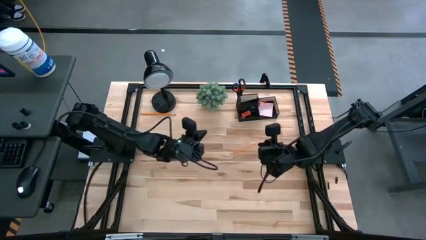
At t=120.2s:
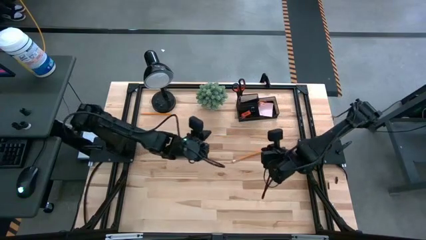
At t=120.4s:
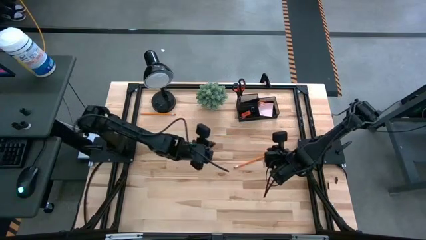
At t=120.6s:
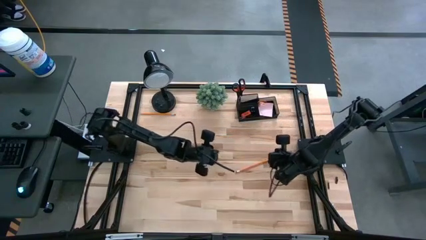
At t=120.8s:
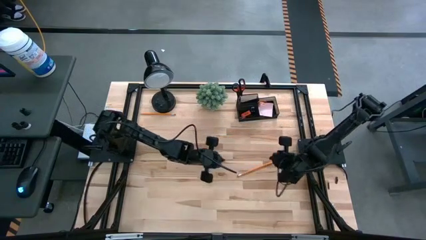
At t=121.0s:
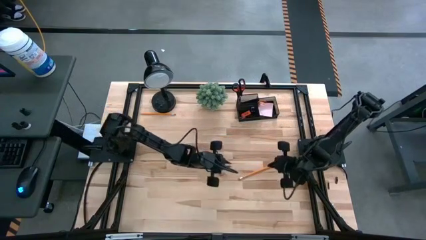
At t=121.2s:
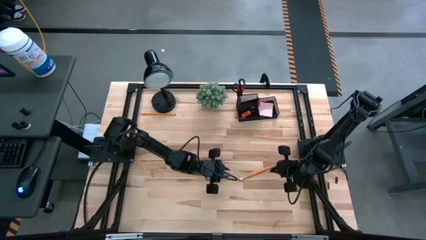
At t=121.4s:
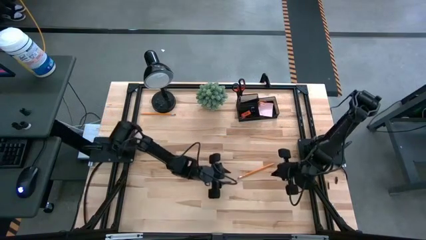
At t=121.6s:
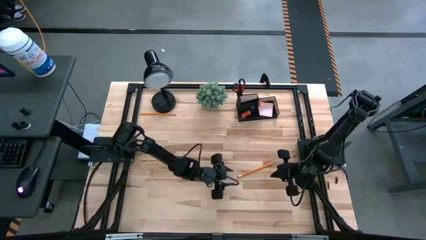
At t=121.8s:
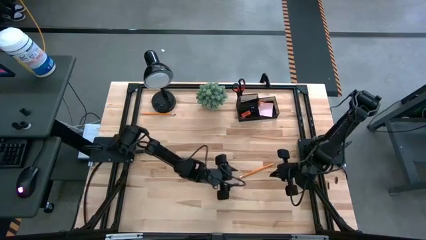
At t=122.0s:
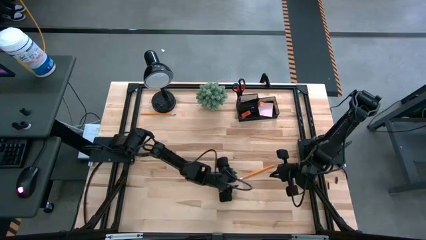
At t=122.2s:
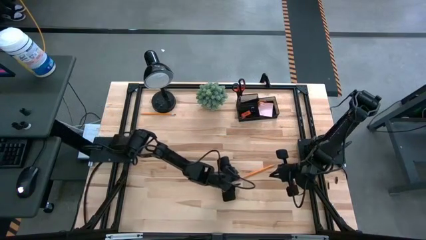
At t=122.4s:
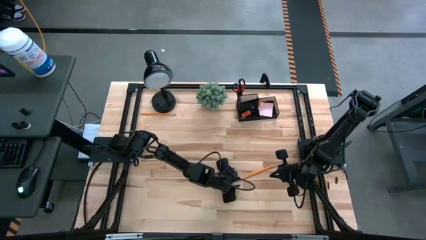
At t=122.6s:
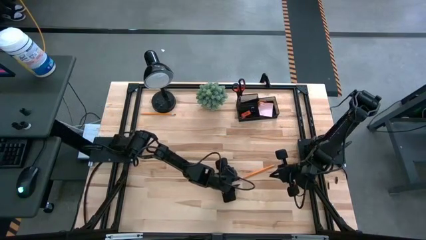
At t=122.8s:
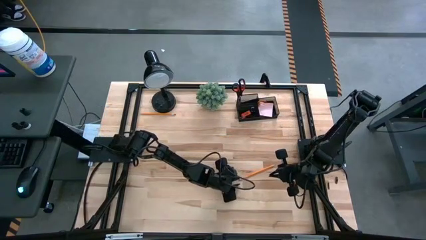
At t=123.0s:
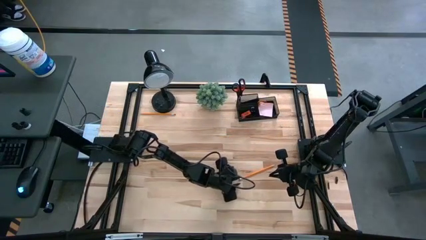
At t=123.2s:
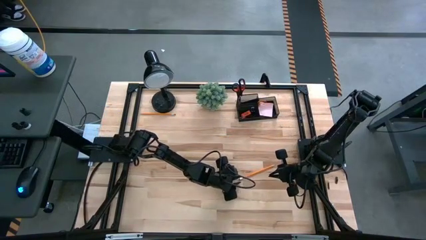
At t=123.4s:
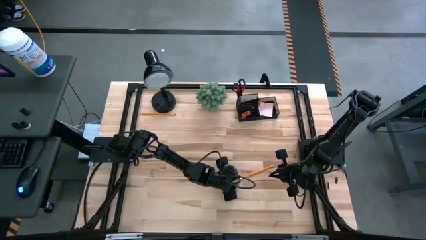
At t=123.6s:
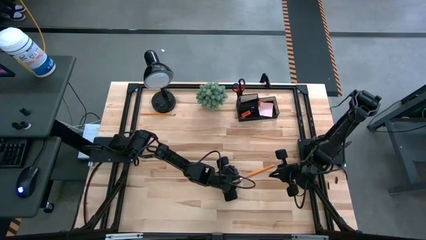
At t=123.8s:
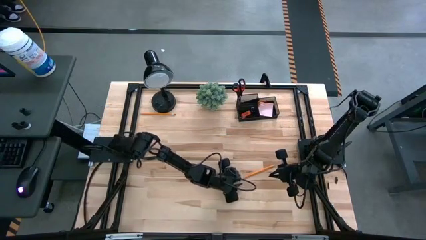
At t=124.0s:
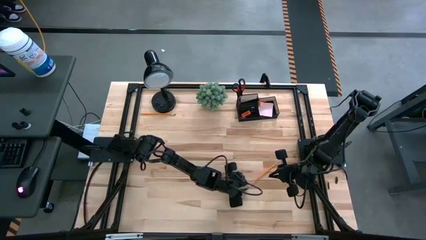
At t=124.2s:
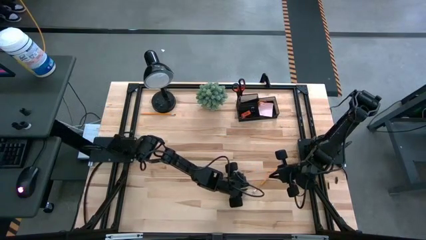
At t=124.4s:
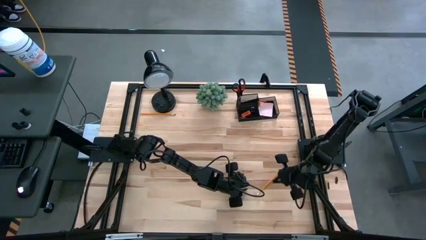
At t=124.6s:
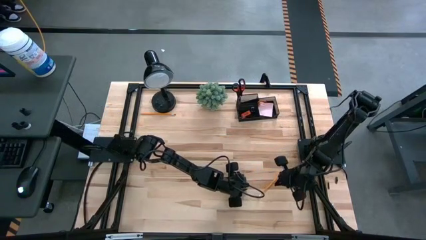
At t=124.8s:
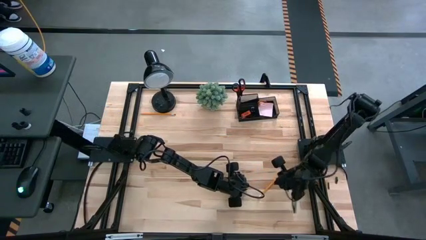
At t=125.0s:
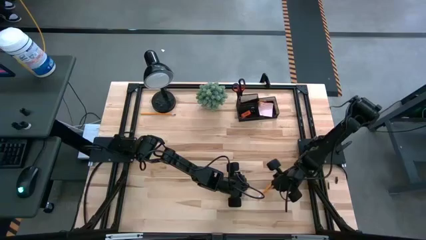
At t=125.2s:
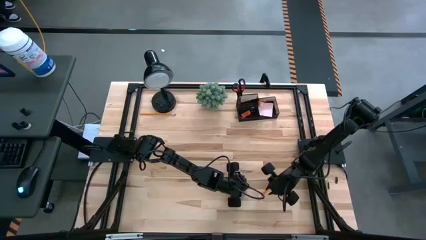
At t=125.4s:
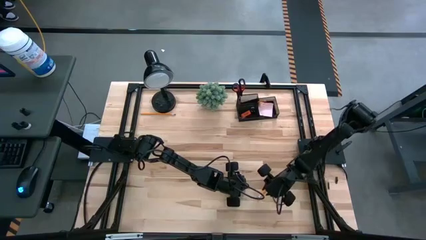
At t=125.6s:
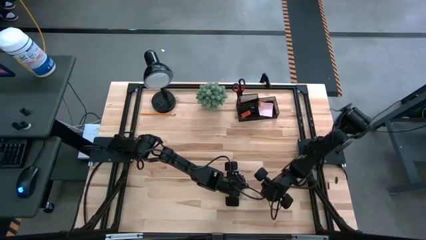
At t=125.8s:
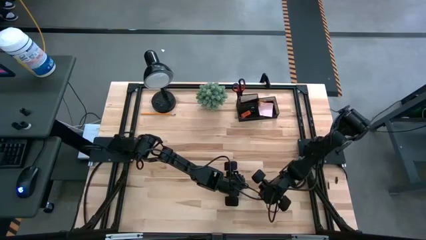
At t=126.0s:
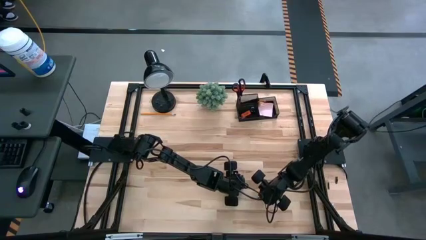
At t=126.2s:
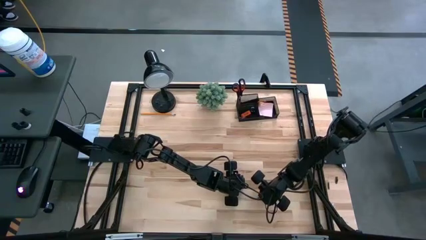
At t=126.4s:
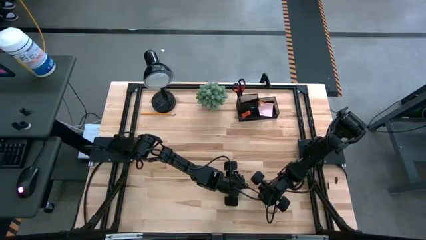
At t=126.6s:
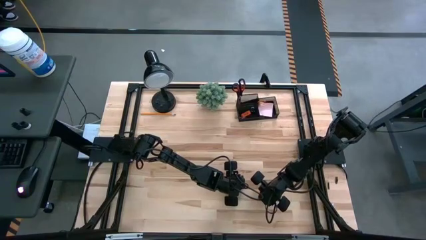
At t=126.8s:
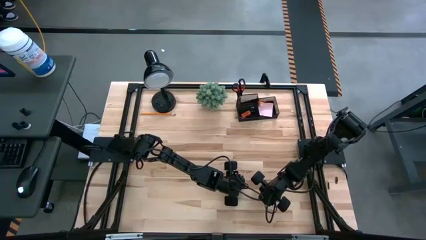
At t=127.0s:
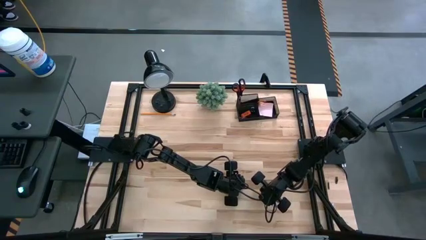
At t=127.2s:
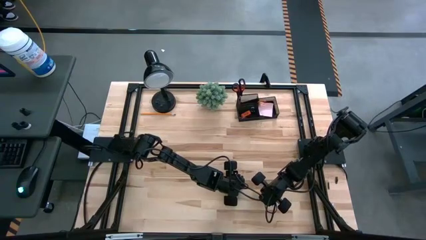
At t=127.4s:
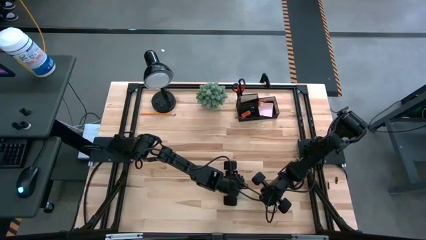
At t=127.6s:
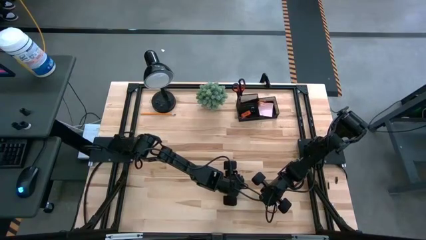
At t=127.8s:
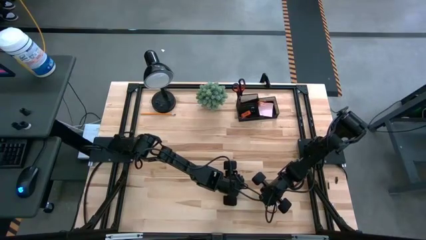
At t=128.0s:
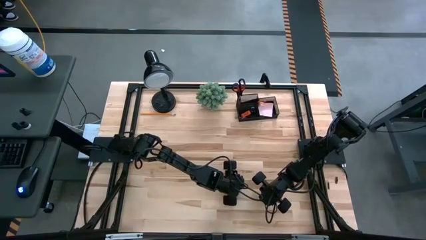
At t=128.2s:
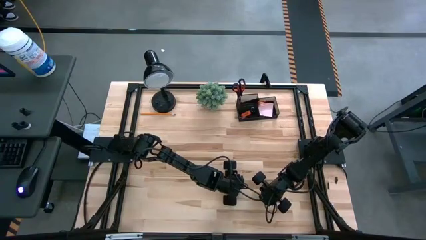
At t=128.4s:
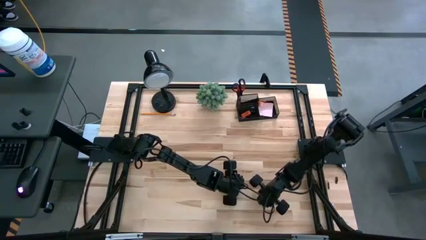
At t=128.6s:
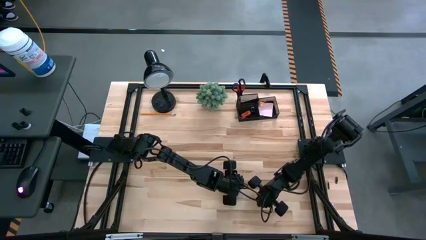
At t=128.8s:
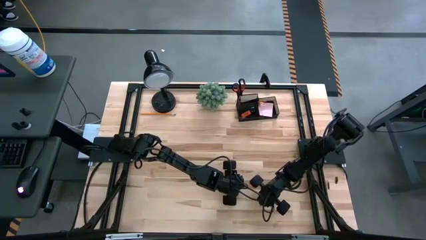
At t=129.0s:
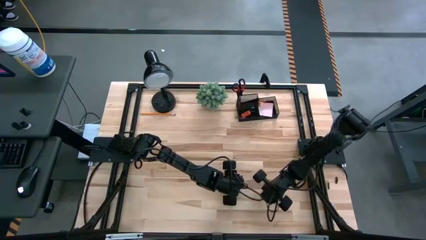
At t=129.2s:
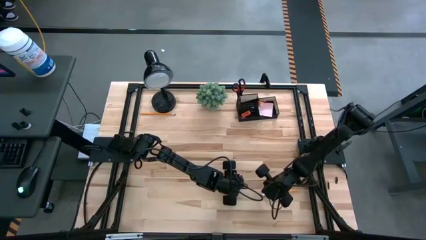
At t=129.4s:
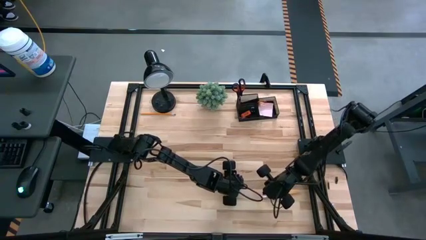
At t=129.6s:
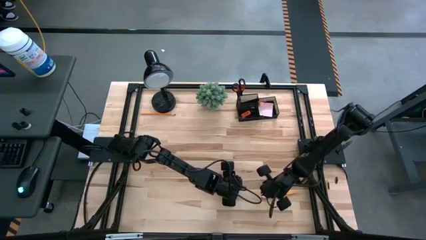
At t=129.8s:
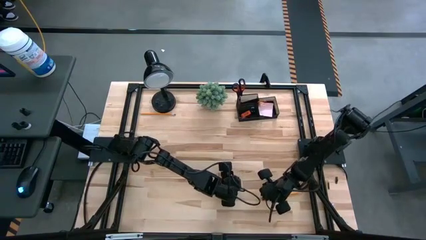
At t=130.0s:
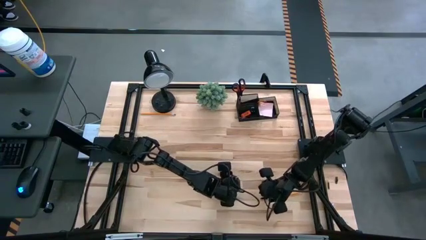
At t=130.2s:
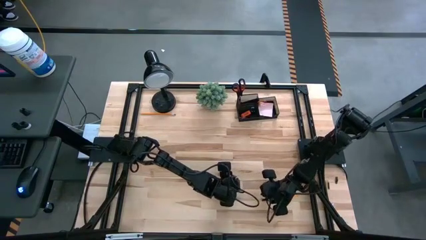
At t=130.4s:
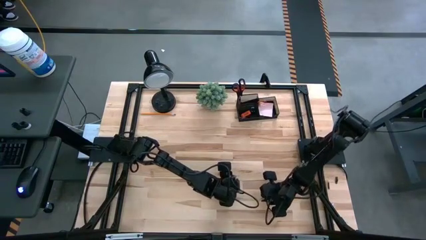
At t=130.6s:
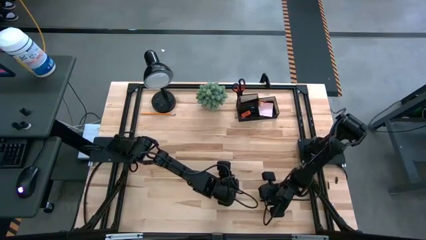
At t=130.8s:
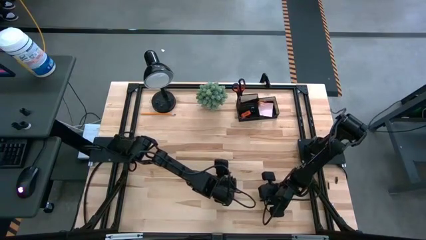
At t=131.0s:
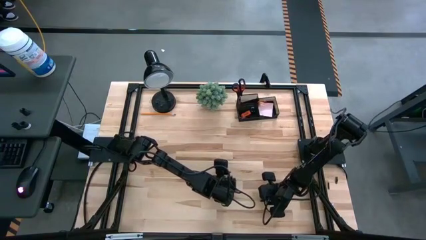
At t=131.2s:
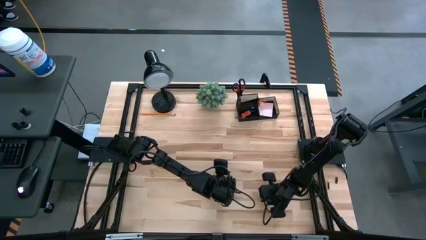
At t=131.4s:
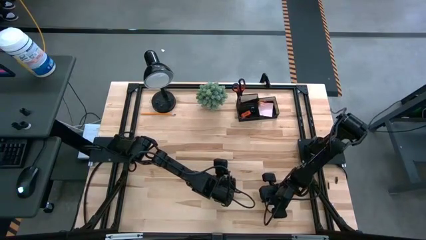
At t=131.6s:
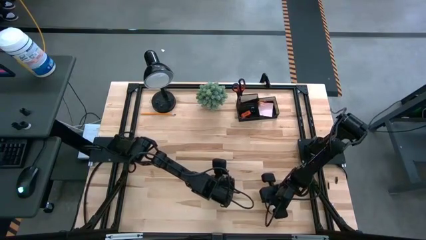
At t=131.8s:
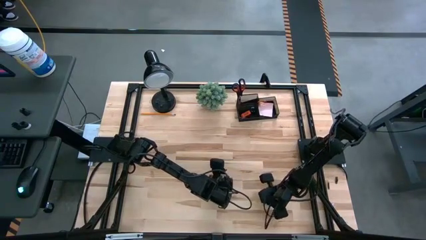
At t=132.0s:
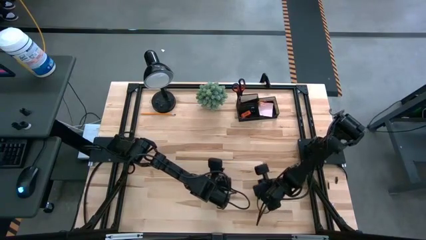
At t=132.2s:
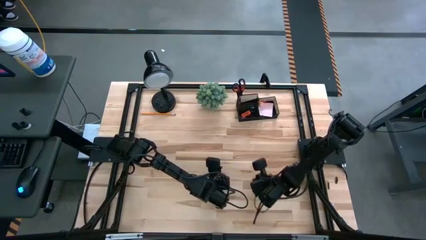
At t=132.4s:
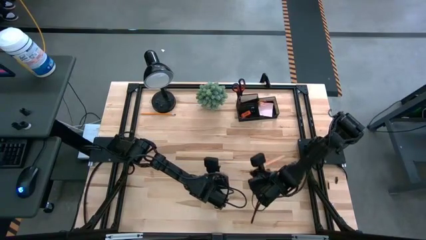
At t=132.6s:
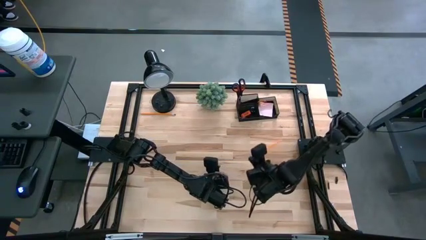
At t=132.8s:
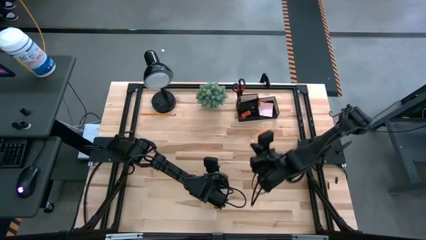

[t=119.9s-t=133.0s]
Task: Pick and place office supplies into organizer
Put the bottom orange pencil into the black desk organizer
